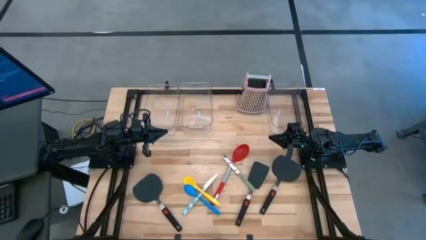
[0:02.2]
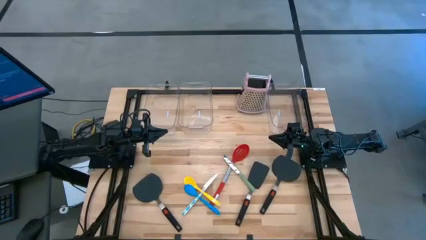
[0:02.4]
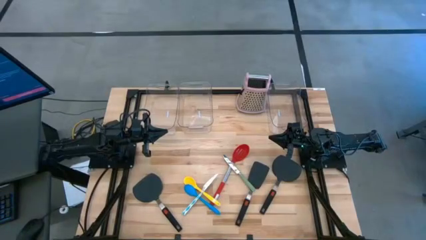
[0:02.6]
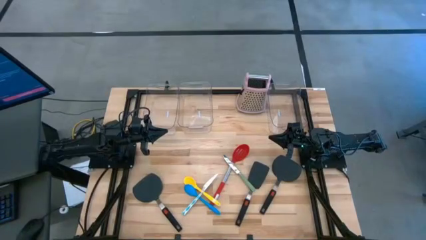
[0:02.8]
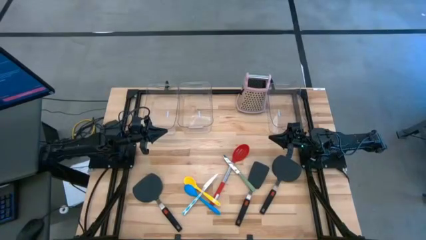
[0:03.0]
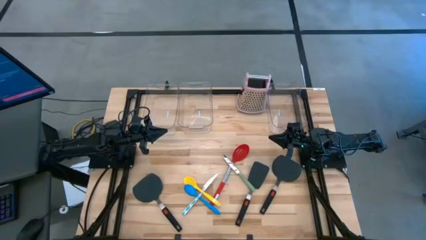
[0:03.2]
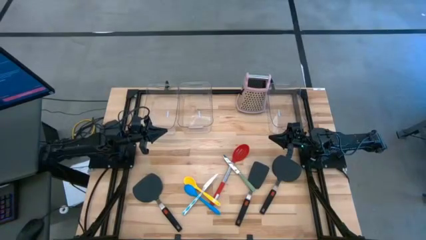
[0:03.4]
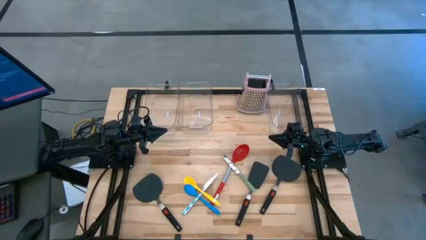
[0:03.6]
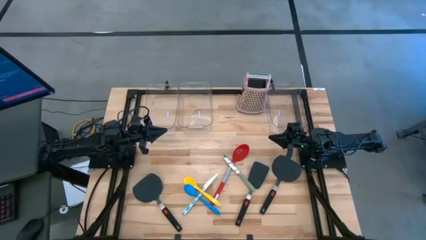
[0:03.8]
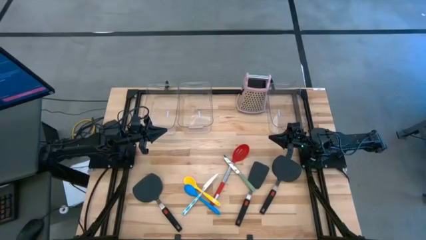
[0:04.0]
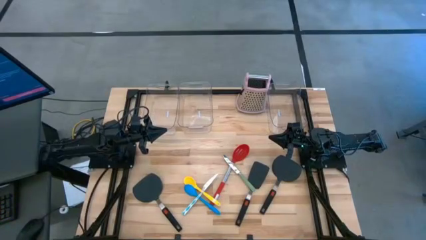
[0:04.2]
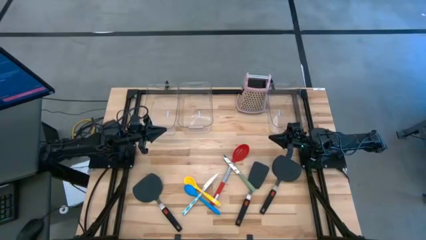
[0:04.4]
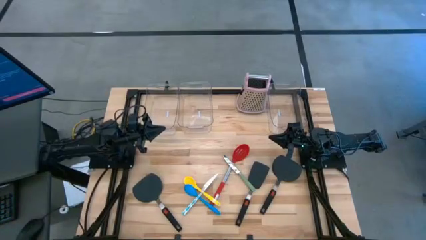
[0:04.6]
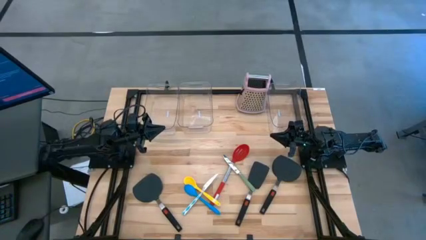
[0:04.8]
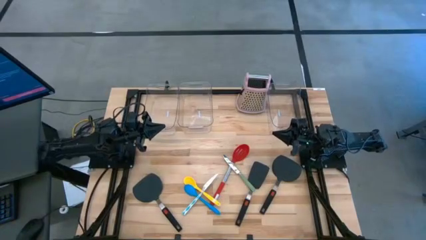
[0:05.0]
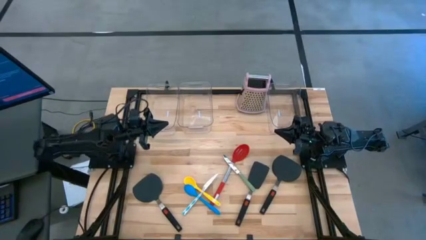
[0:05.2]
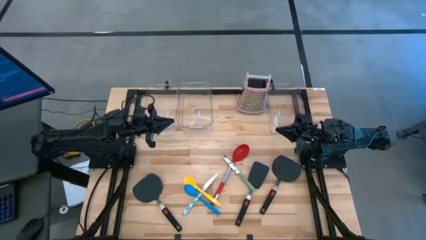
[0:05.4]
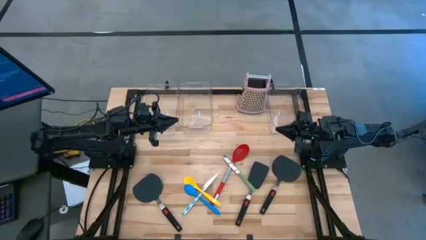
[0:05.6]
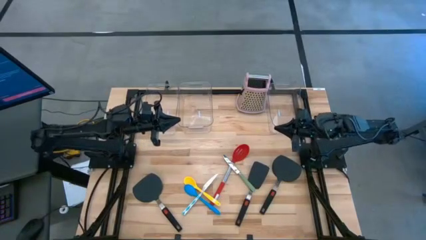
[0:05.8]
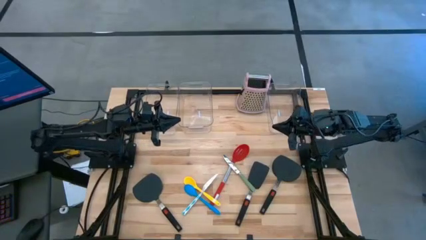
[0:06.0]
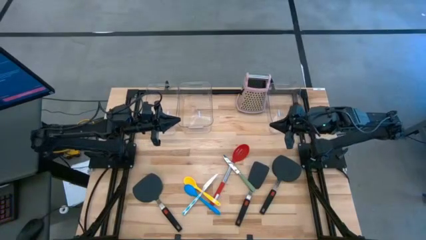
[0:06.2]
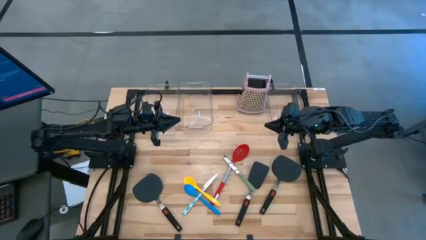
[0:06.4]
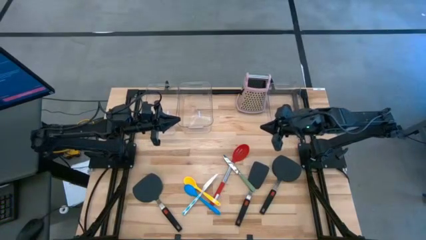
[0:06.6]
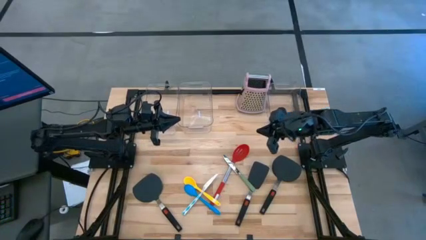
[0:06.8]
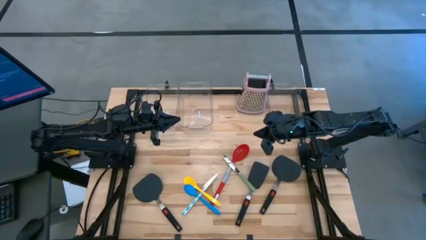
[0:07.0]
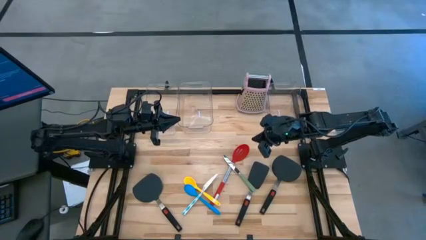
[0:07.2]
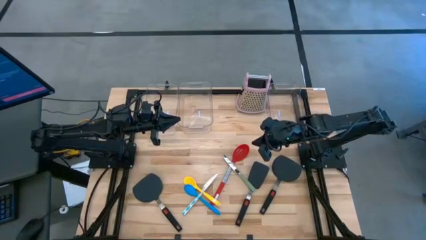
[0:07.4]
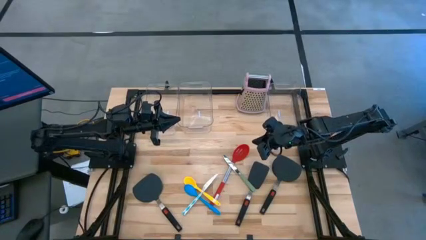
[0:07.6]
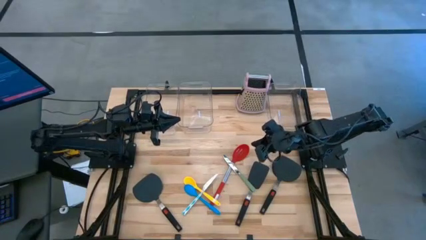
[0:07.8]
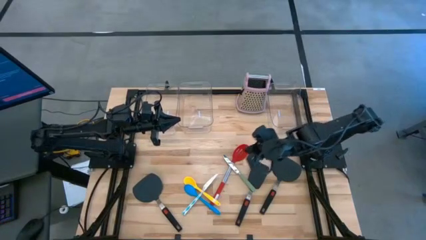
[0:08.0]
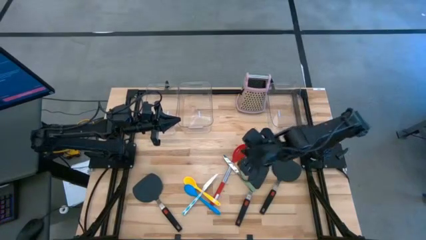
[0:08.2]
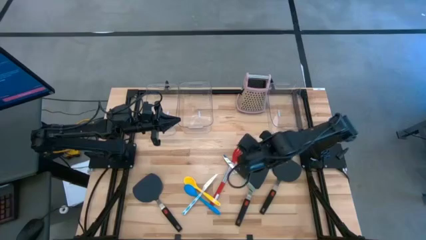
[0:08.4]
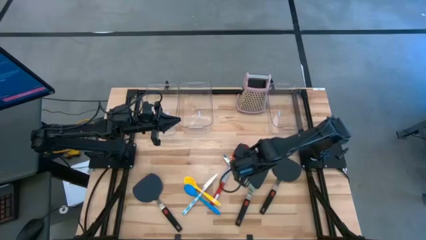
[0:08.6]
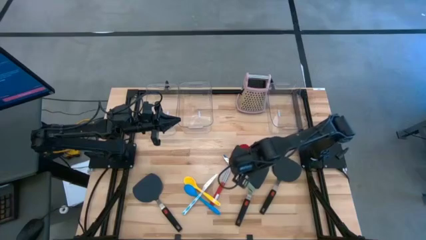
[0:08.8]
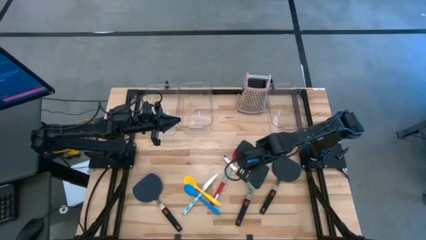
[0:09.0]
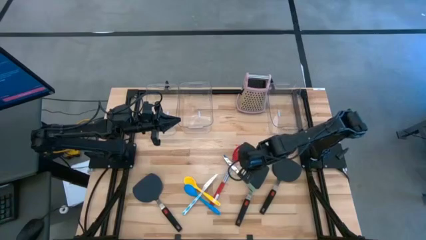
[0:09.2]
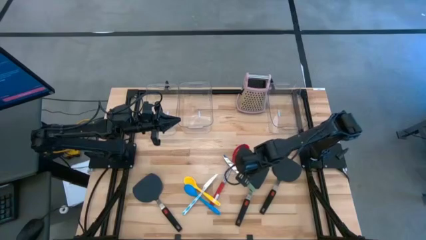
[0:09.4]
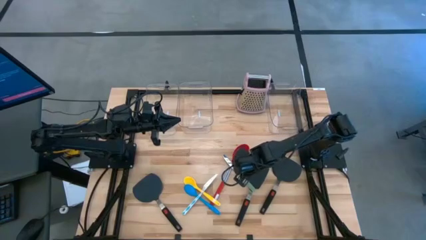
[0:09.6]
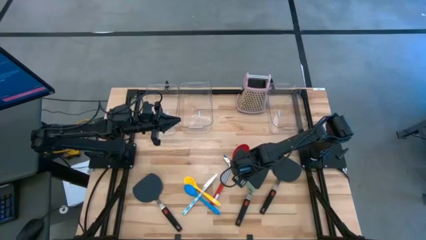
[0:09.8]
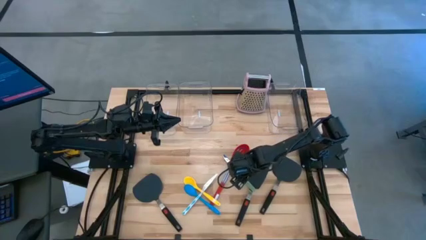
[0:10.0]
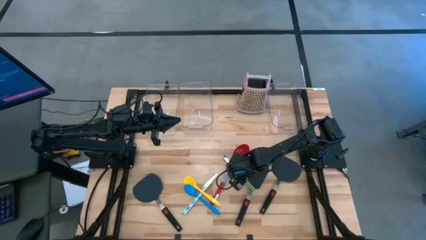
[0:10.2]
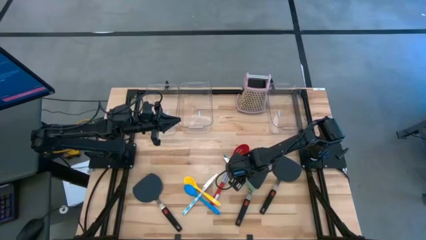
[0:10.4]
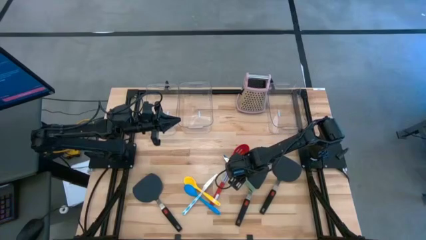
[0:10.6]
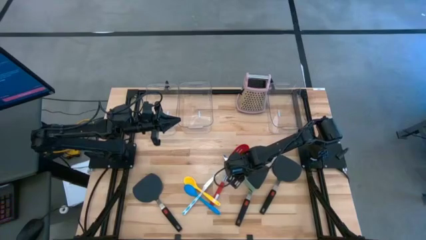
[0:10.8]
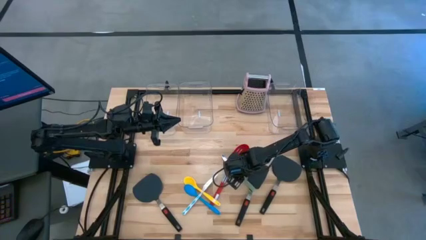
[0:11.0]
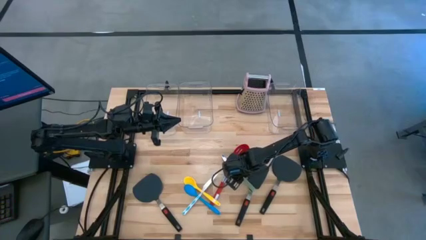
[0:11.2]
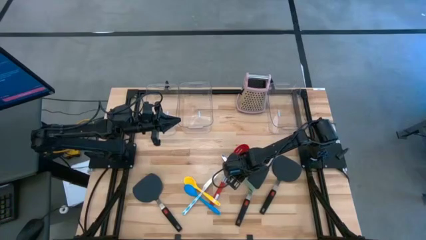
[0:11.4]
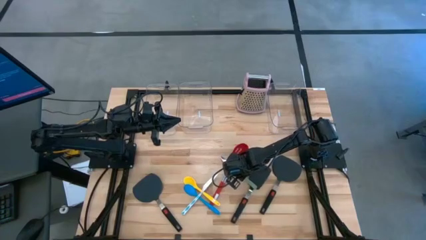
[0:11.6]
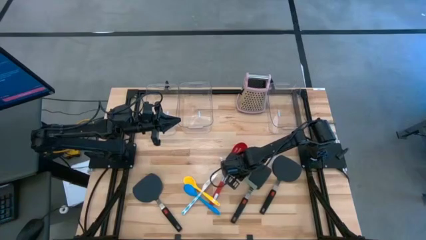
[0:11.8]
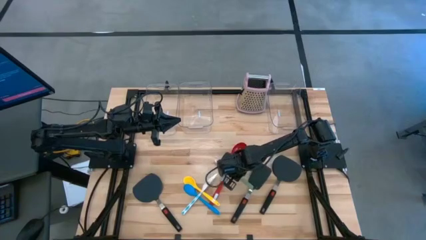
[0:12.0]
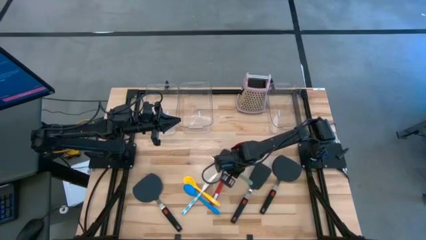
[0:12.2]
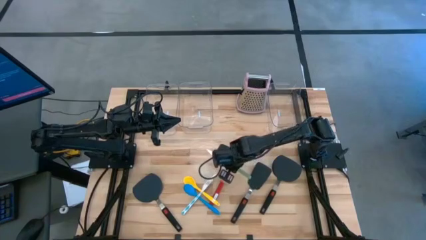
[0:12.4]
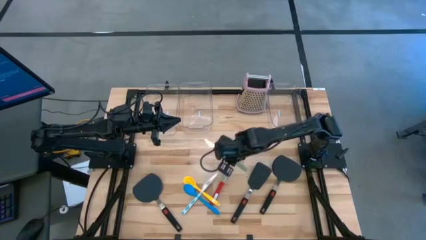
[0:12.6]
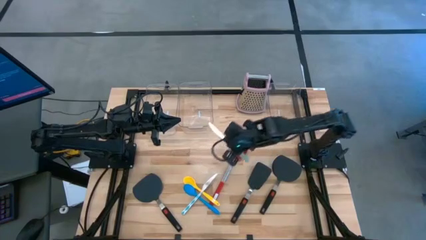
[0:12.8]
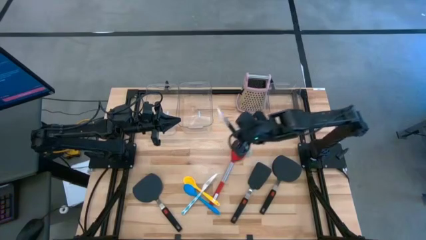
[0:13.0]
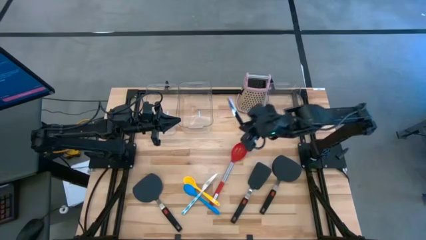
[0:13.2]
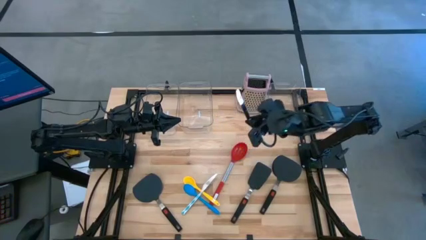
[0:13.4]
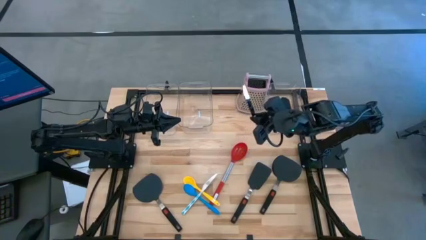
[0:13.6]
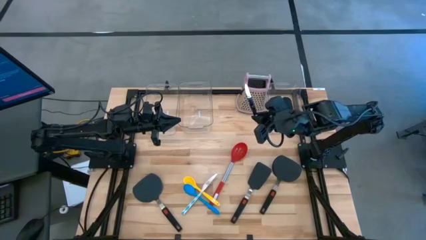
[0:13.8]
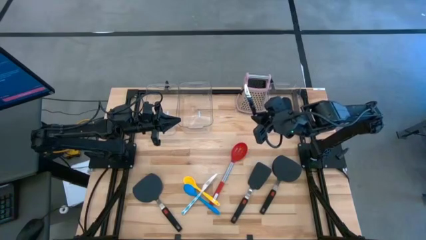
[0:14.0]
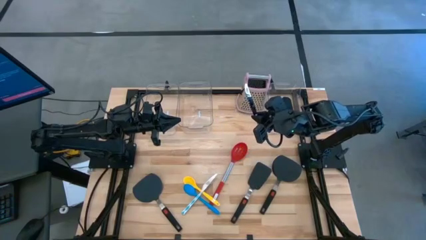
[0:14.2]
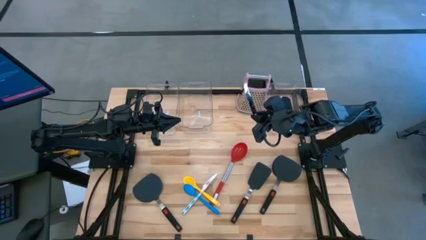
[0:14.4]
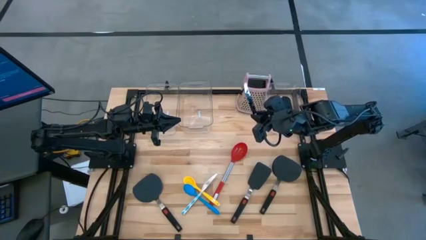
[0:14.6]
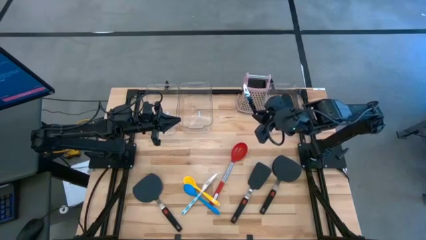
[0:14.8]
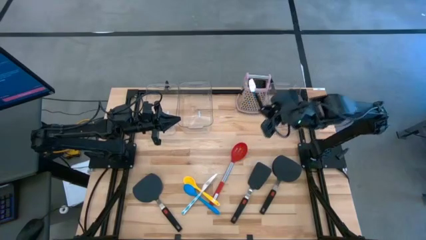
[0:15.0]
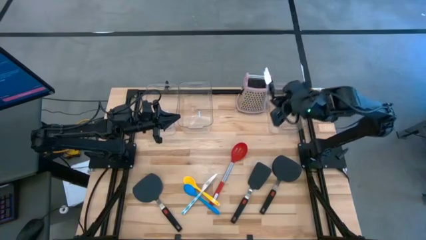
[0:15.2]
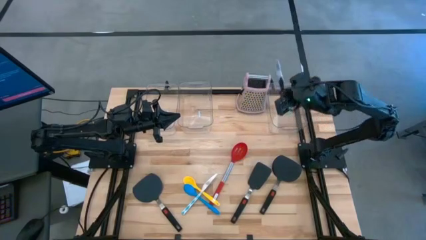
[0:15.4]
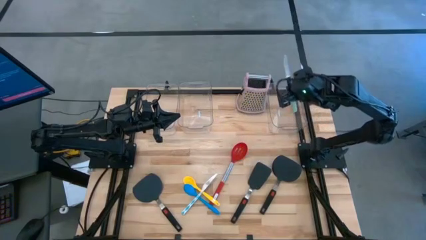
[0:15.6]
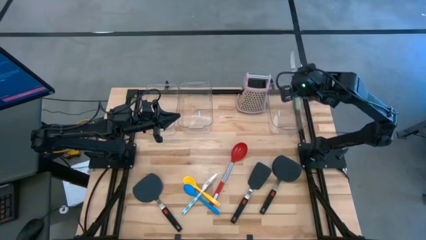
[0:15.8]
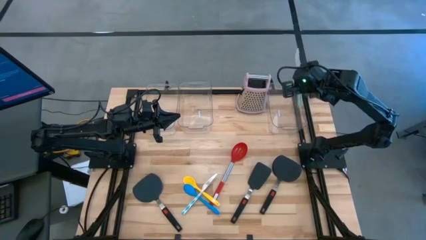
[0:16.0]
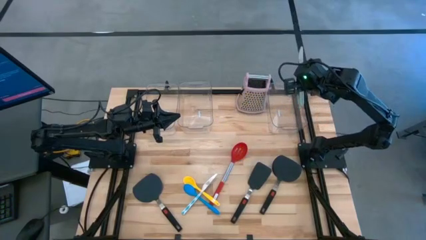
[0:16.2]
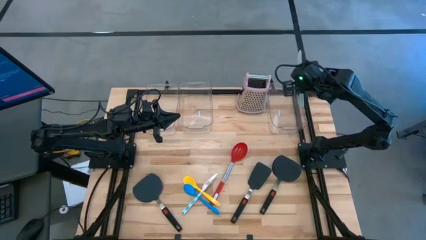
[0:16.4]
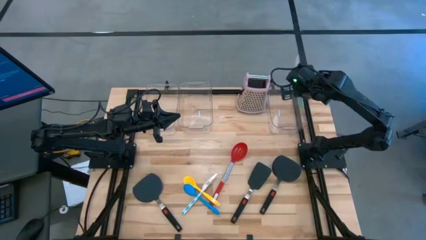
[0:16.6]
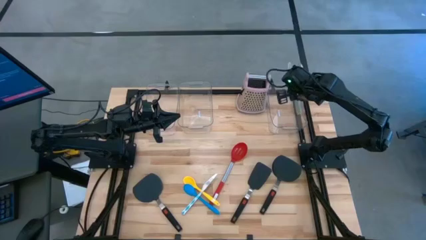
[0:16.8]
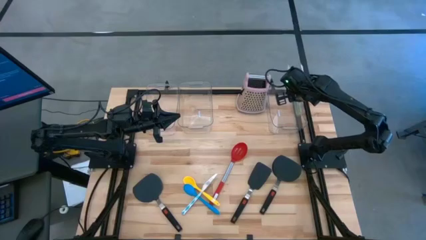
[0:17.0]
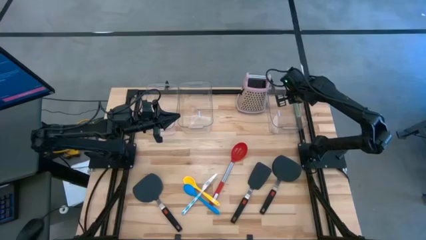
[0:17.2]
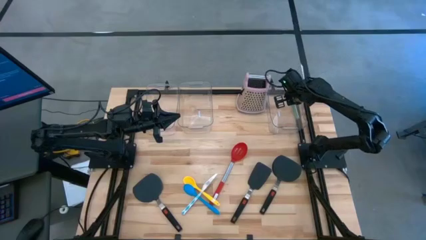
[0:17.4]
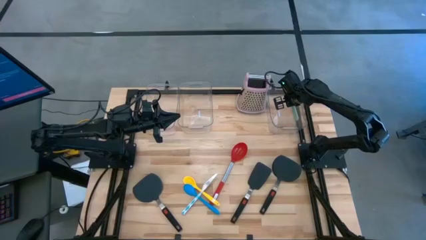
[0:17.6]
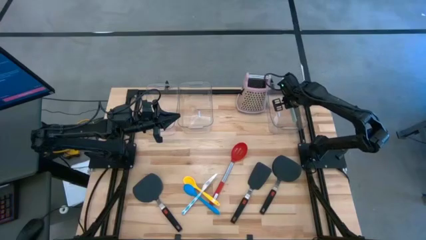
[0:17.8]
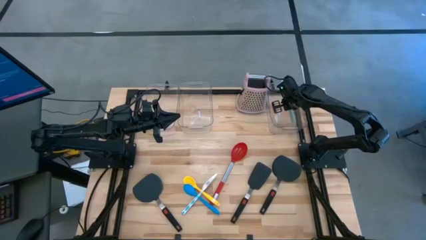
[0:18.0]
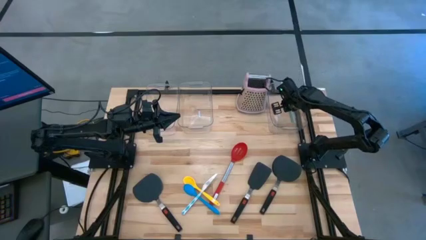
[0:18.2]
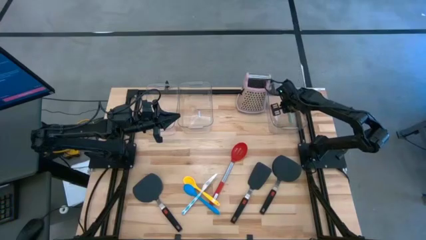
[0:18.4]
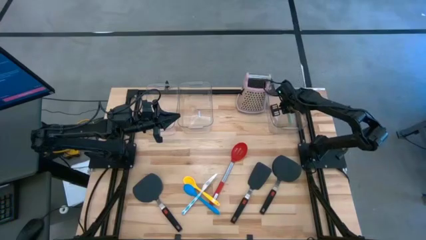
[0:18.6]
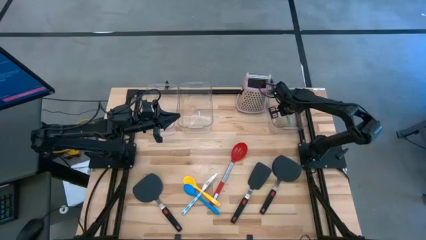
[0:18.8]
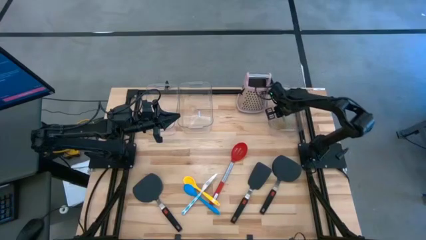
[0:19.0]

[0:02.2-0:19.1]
Task: Pick & Place Kitchen Items
Put the green table knife into the right transparent bin
